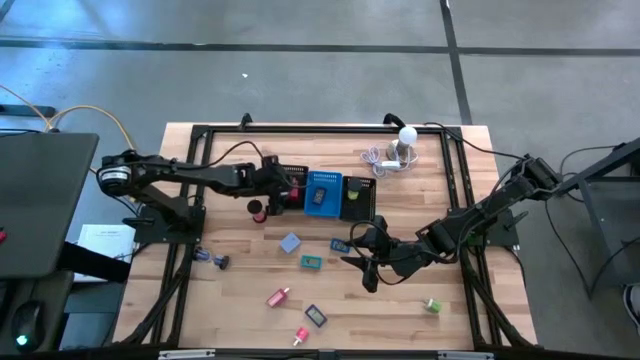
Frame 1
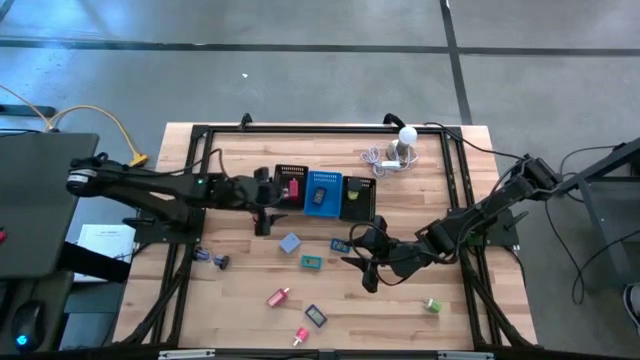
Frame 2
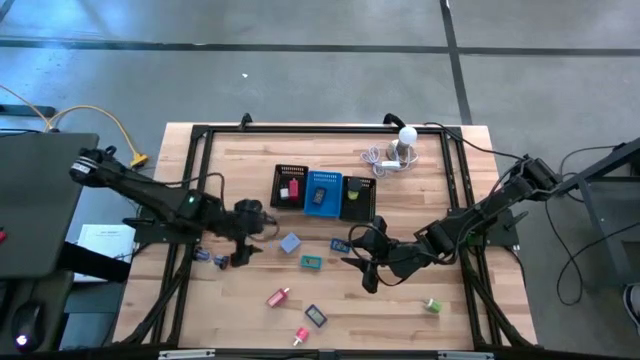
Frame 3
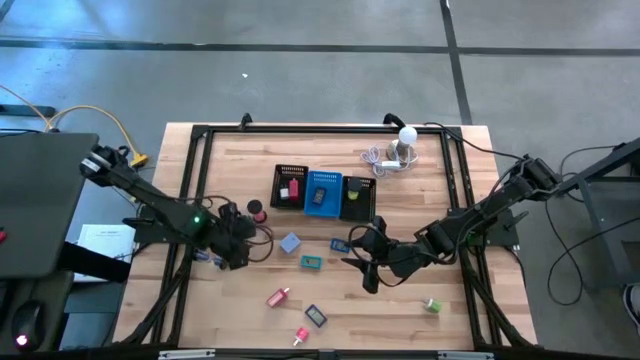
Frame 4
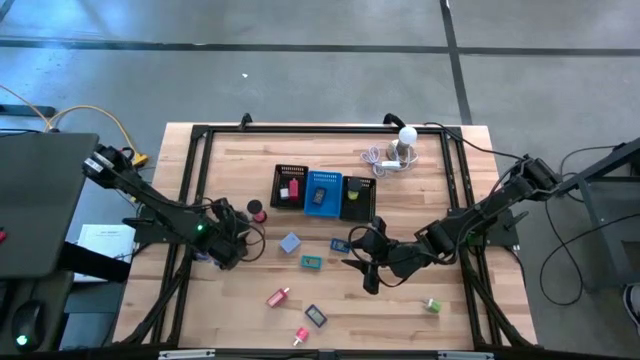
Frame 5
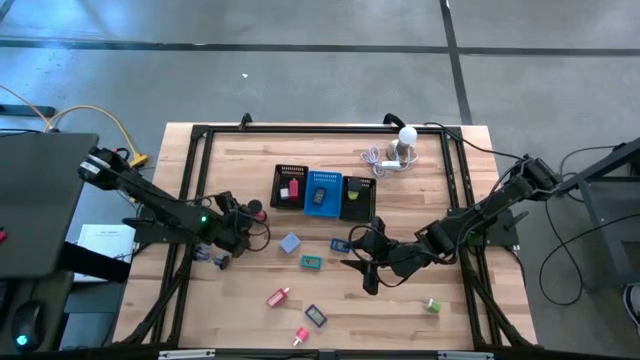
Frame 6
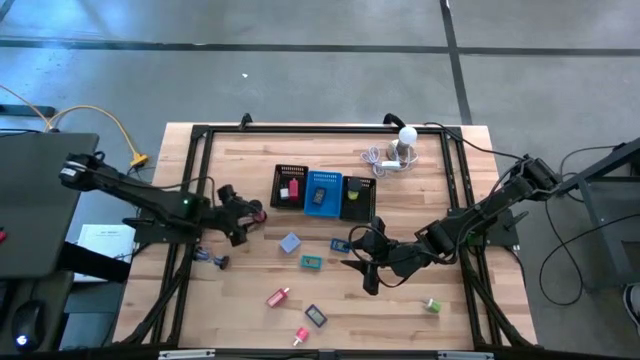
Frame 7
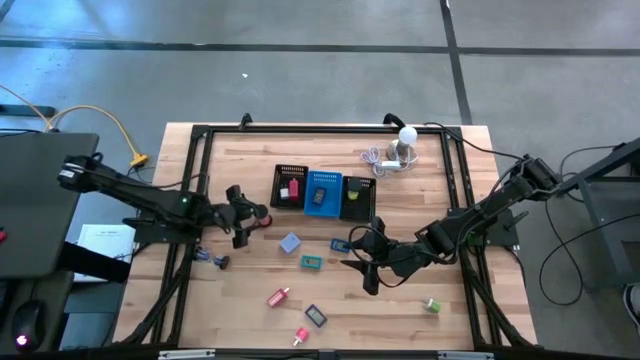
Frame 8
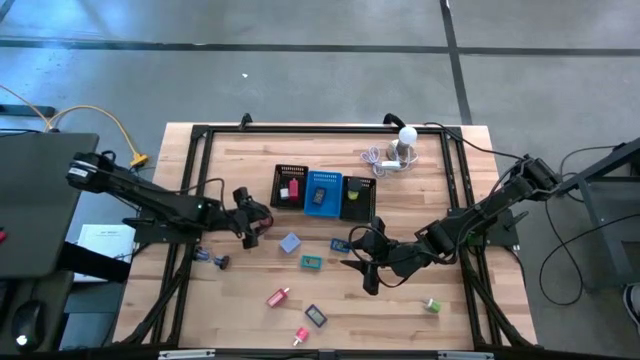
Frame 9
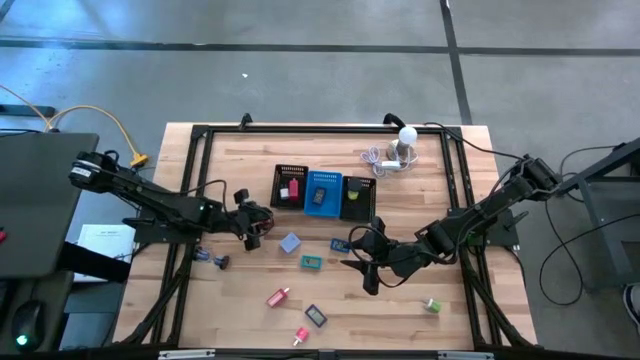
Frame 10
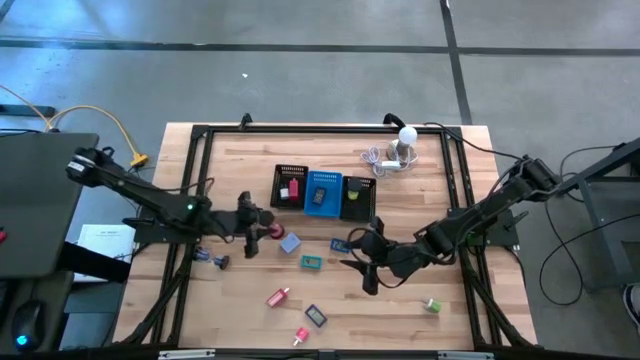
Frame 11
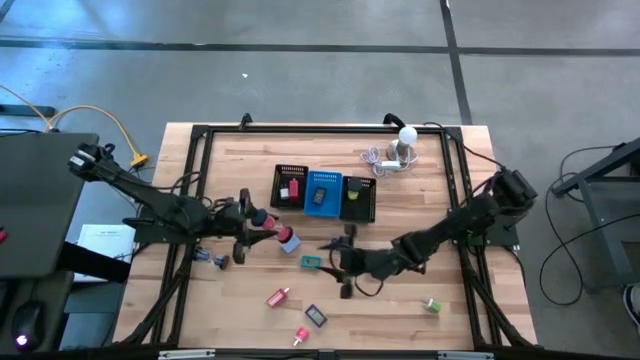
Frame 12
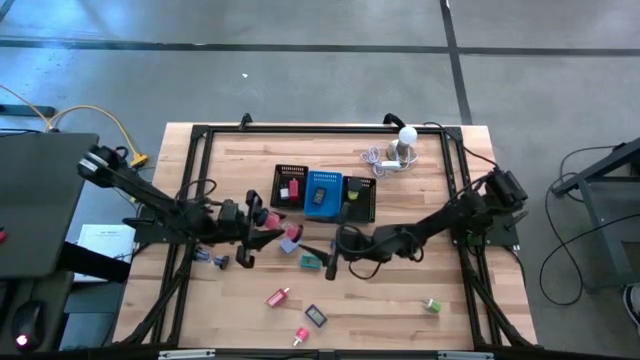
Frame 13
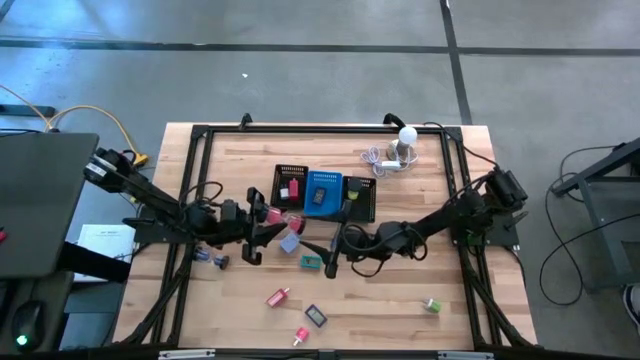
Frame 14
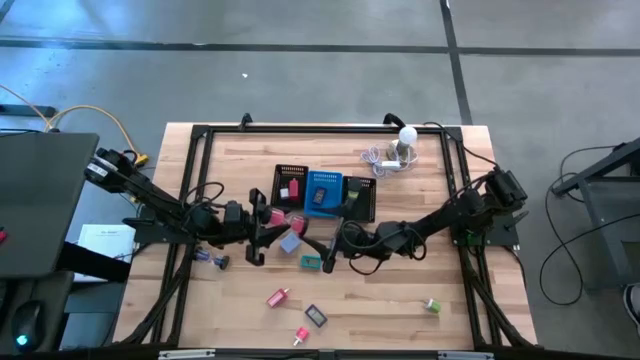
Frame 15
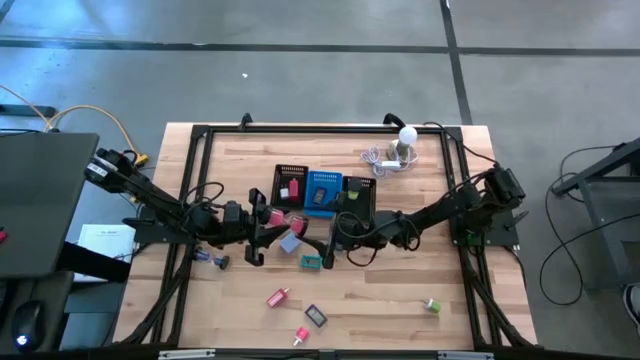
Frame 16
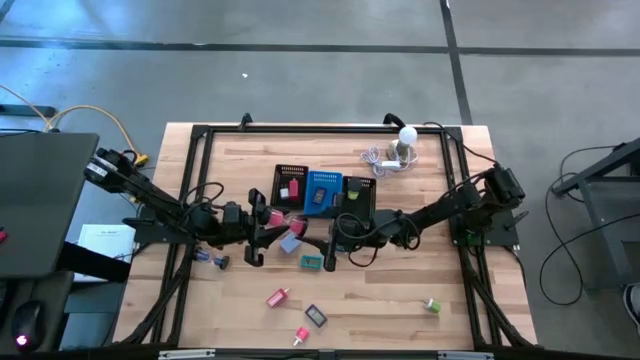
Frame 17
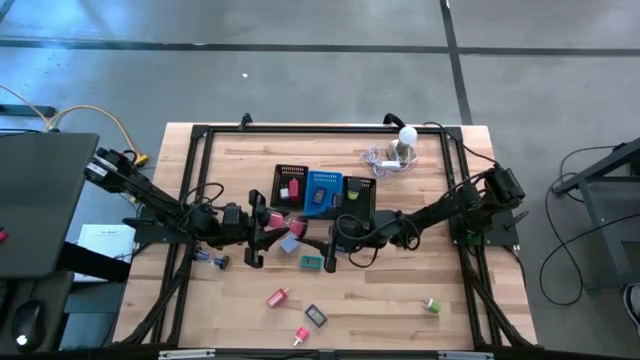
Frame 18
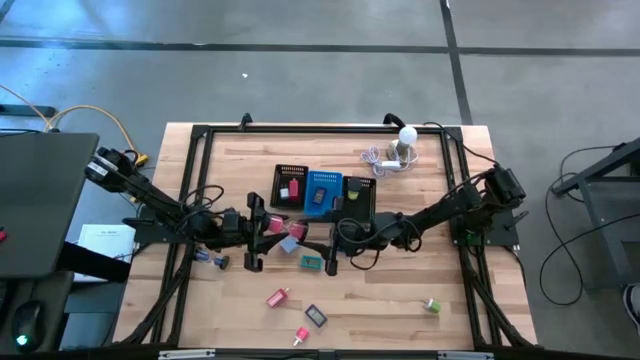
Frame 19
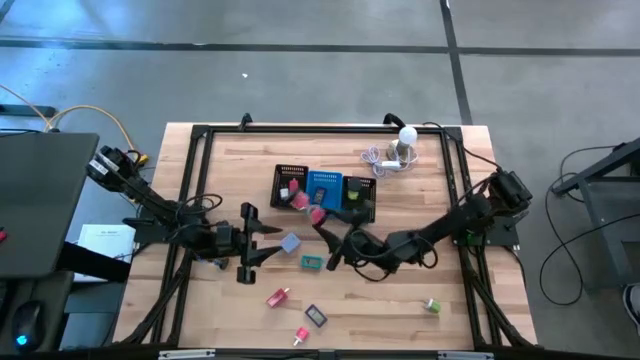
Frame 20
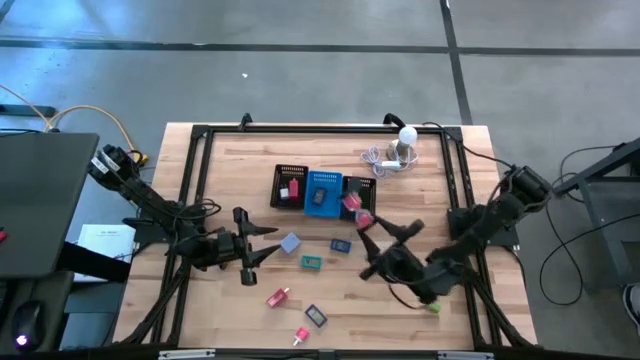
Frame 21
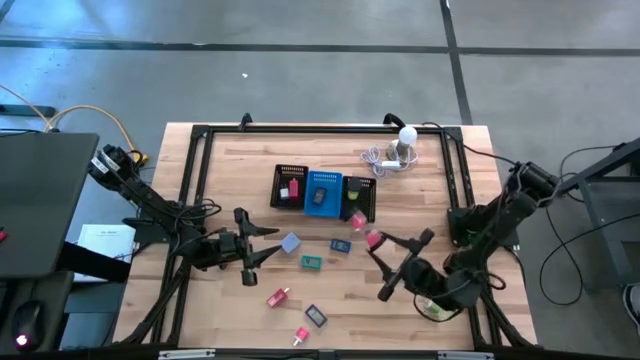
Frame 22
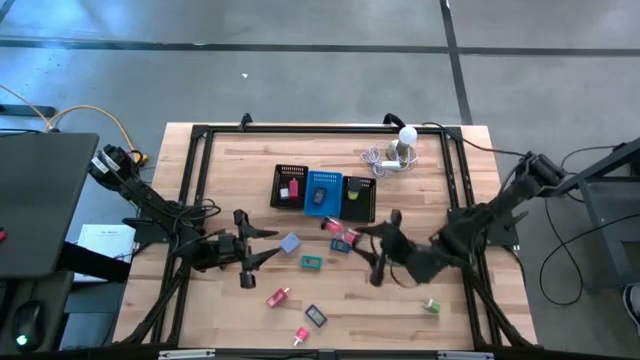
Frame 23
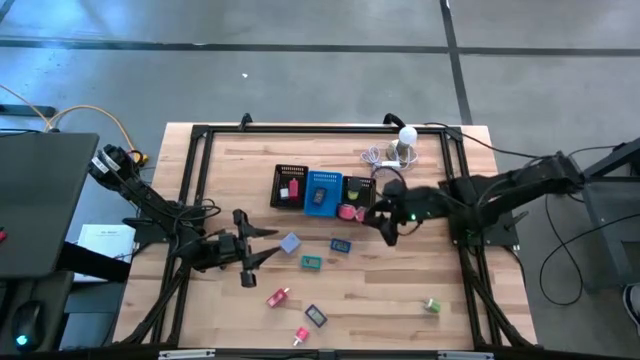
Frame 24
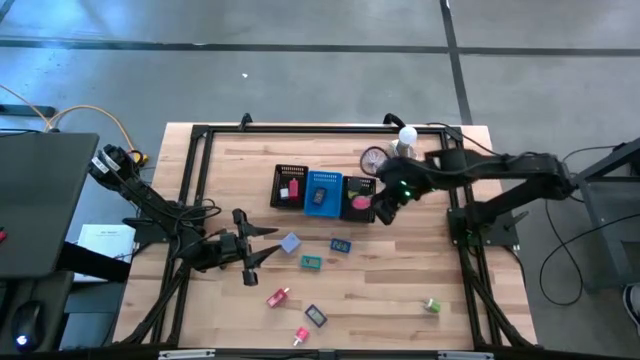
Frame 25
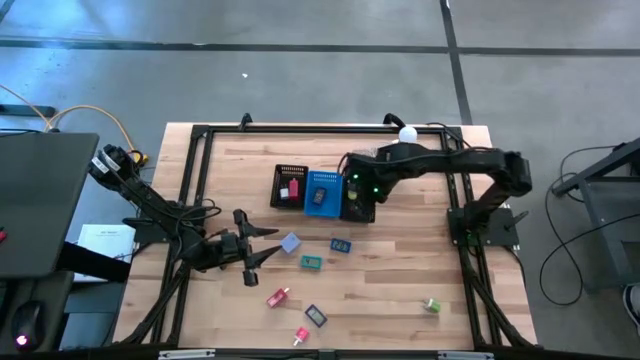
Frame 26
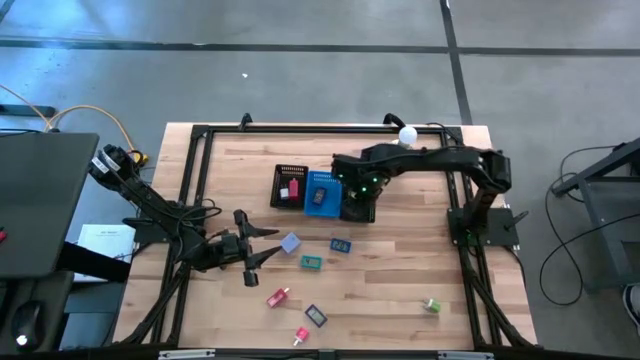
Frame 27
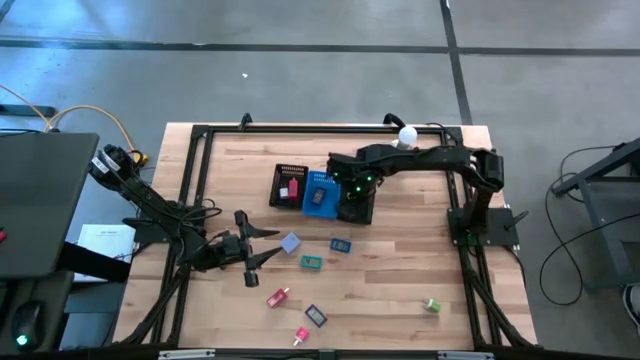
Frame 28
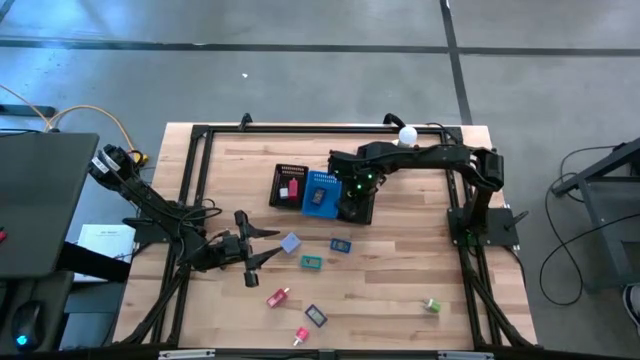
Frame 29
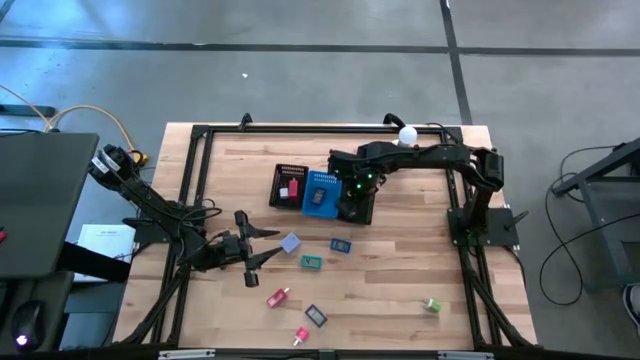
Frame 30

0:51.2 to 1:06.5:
Task: Pick & Place Office items
Put the pink hour glass into the right black bin

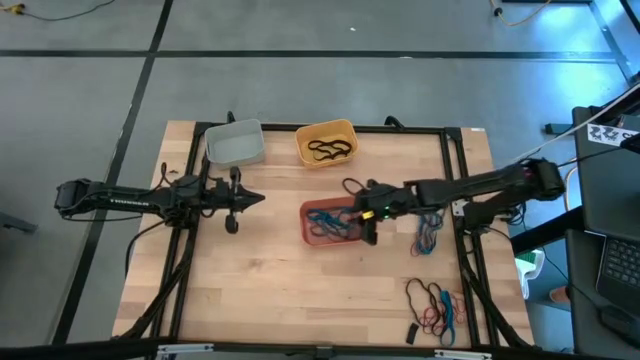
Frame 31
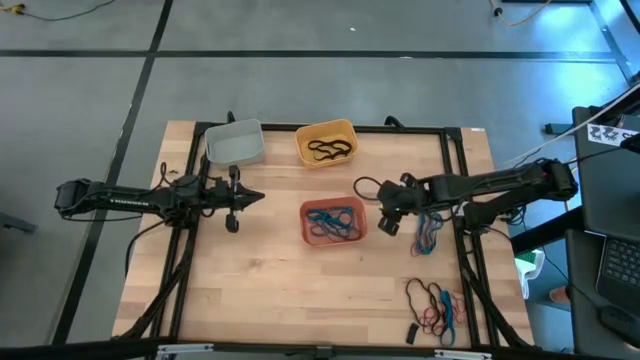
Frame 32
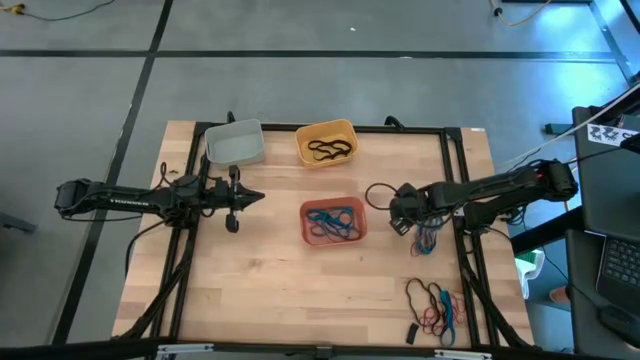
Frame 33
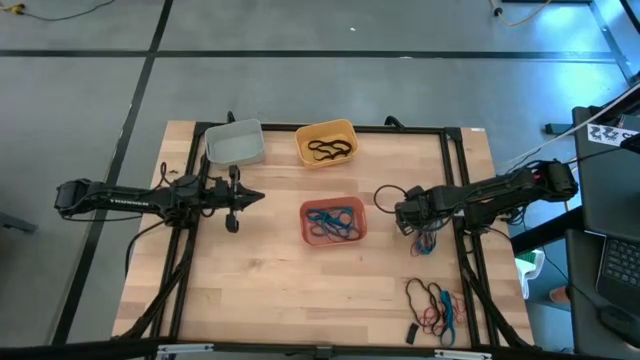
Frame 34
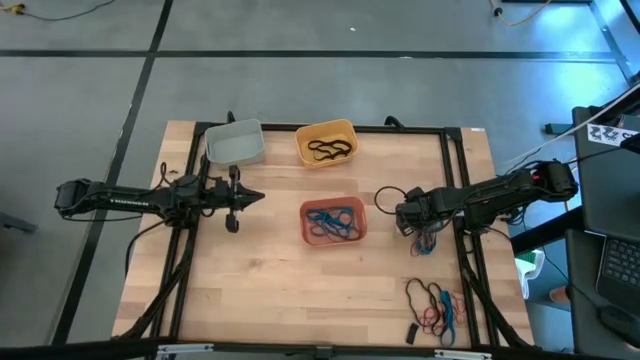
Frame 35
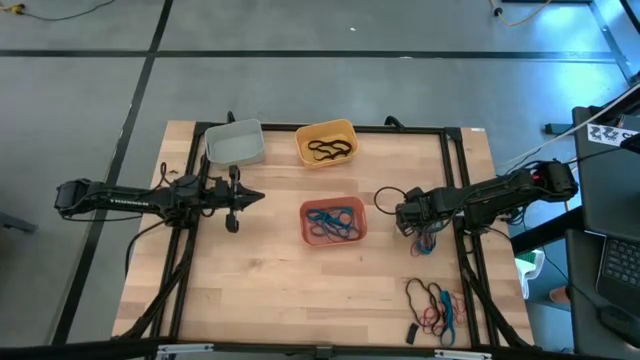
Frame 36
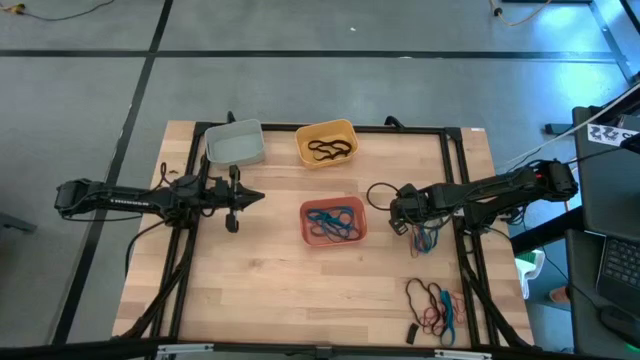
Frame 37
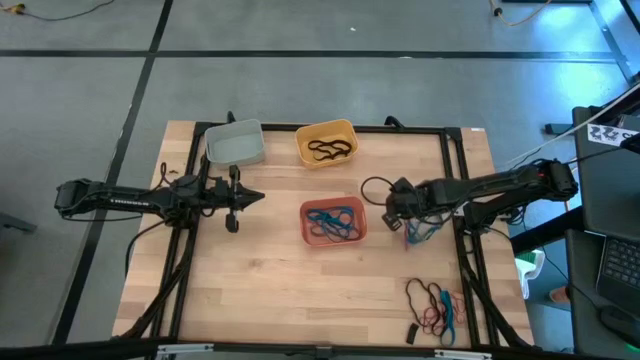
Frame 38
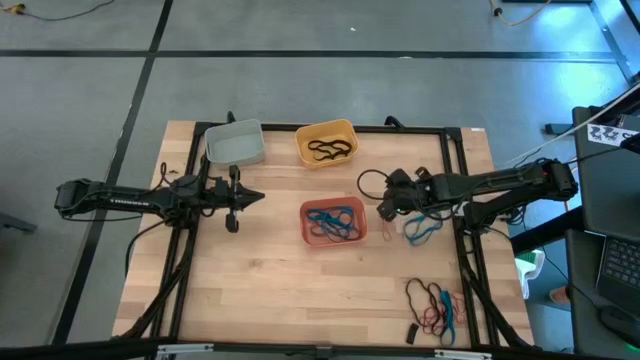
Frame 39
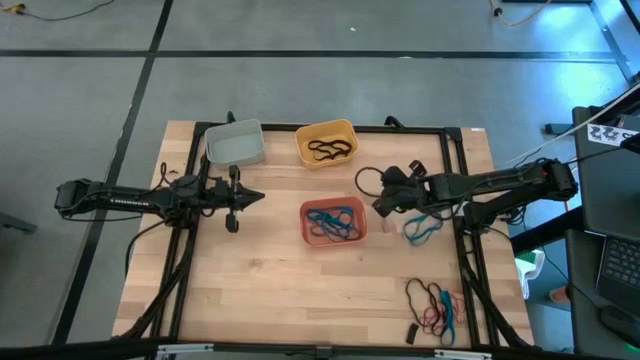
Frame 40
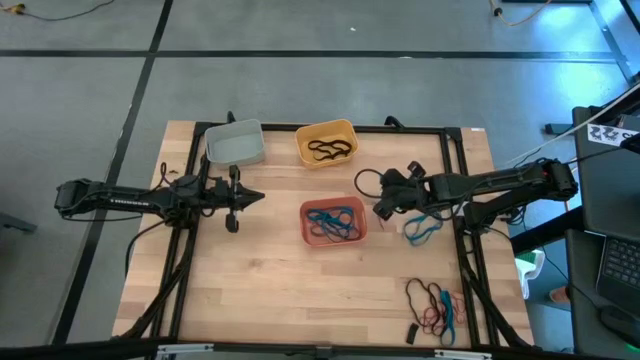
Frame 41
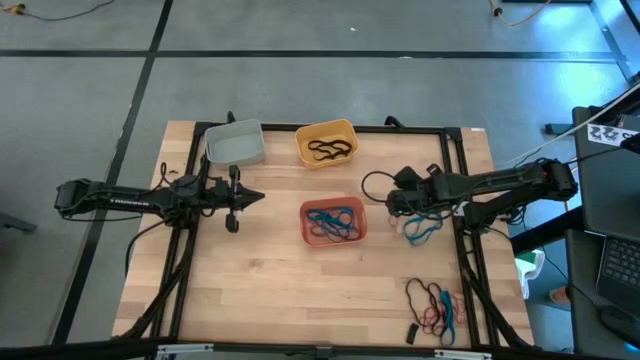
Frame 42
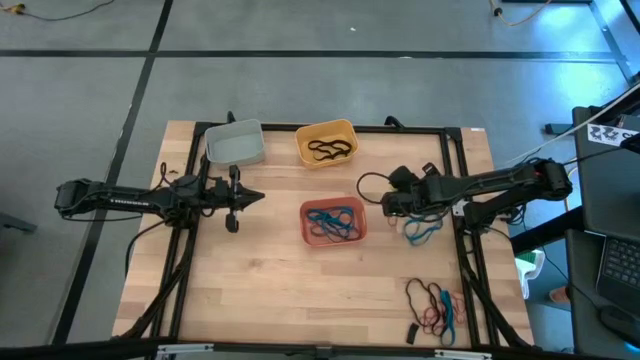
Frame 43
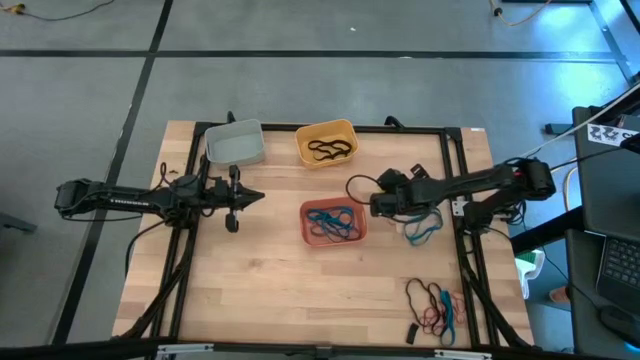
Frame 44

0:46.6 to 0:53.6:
Task: Sort rubber bands into baskets
Put the blue rubber band into the orange bin
